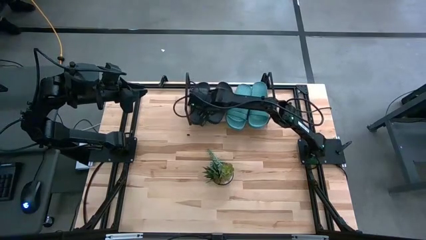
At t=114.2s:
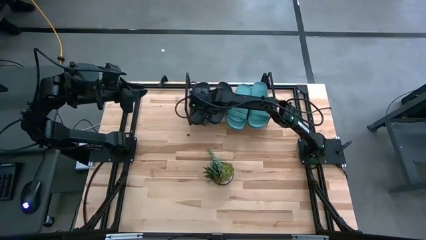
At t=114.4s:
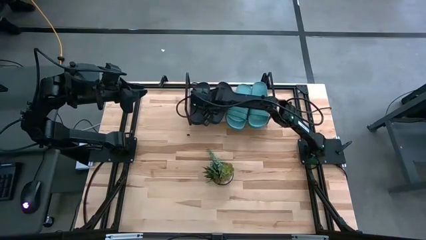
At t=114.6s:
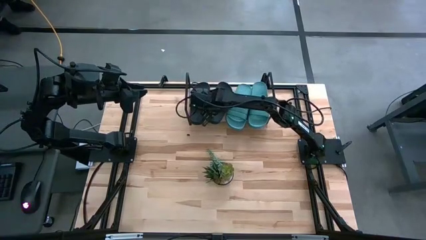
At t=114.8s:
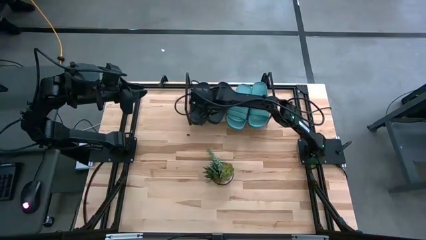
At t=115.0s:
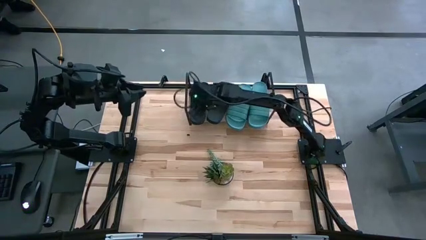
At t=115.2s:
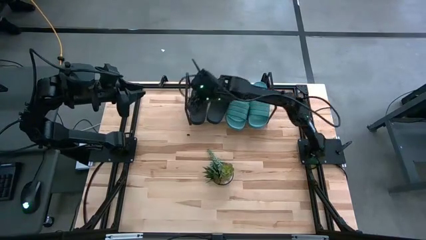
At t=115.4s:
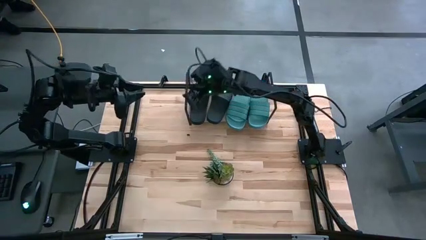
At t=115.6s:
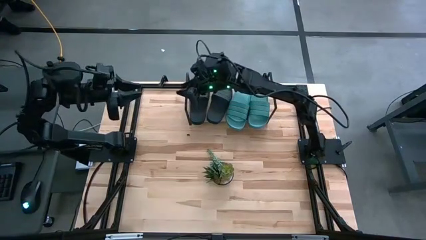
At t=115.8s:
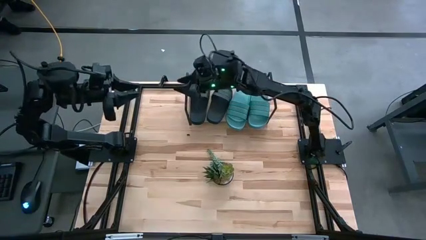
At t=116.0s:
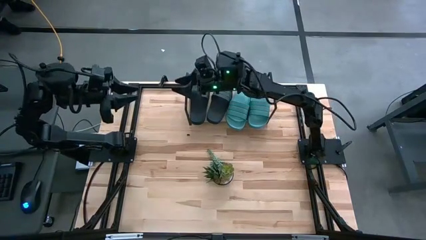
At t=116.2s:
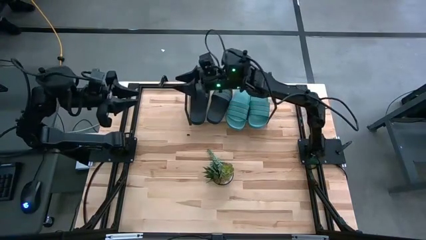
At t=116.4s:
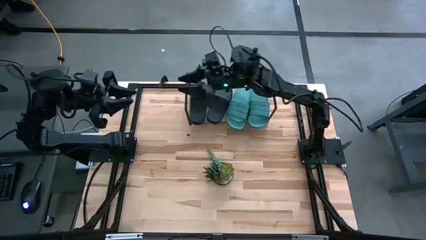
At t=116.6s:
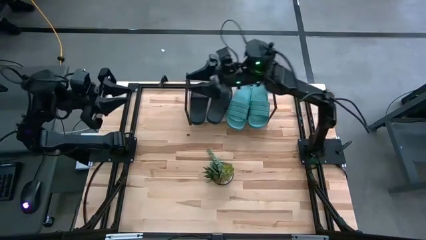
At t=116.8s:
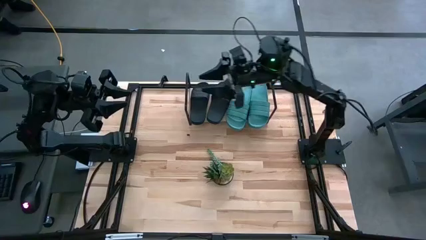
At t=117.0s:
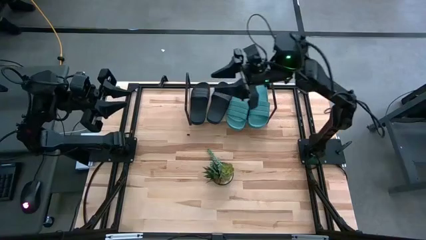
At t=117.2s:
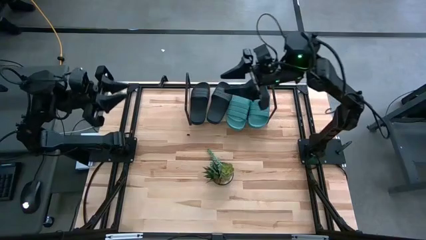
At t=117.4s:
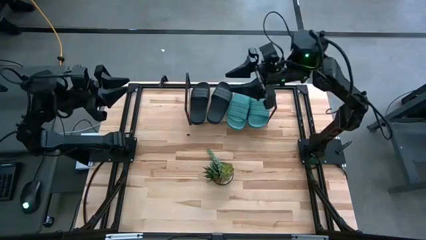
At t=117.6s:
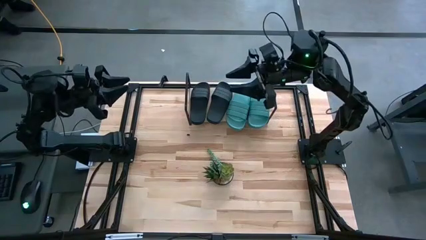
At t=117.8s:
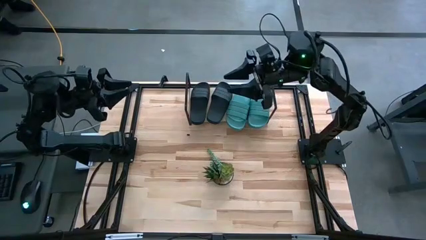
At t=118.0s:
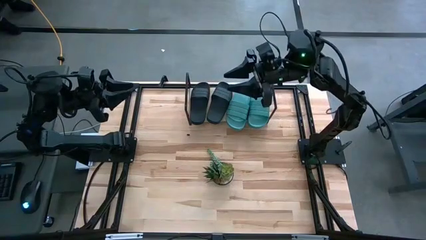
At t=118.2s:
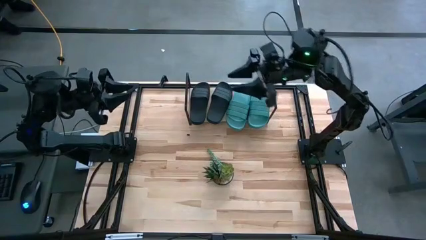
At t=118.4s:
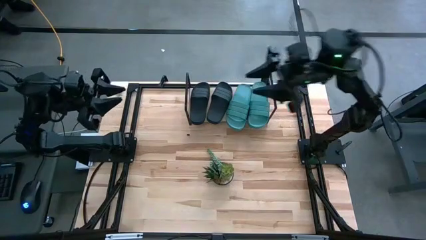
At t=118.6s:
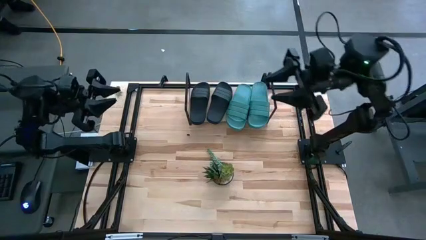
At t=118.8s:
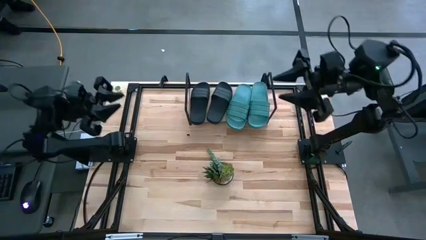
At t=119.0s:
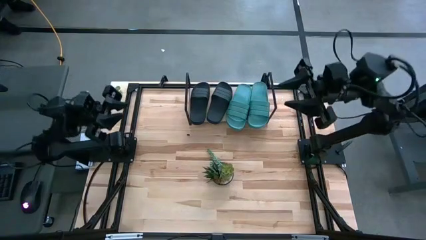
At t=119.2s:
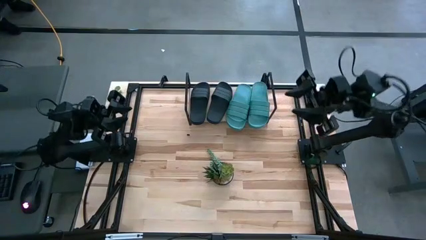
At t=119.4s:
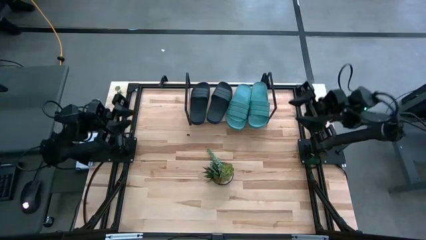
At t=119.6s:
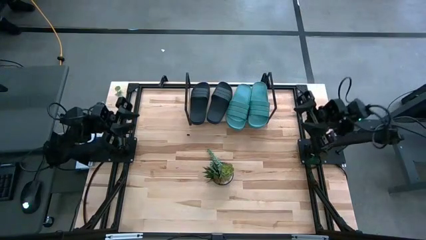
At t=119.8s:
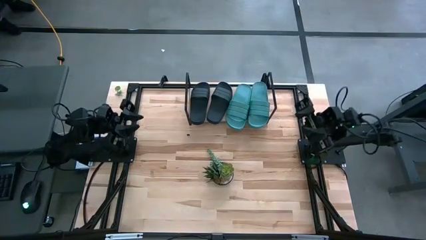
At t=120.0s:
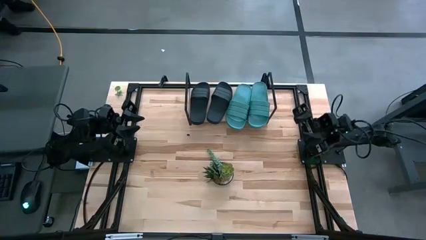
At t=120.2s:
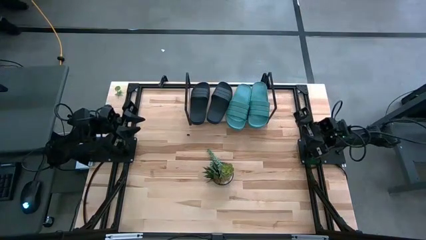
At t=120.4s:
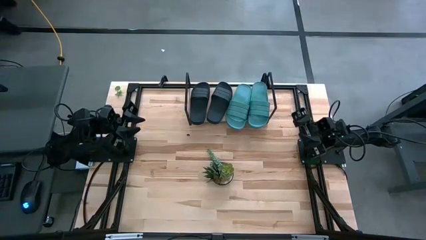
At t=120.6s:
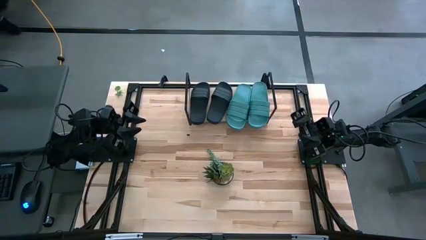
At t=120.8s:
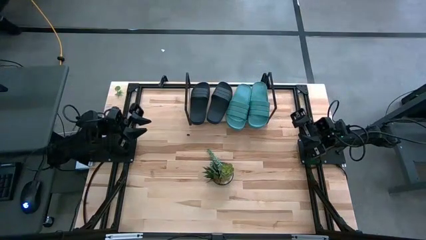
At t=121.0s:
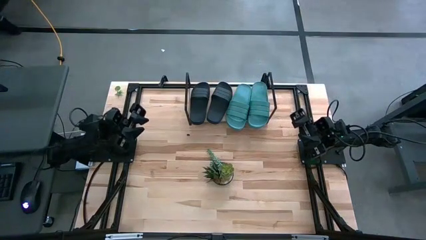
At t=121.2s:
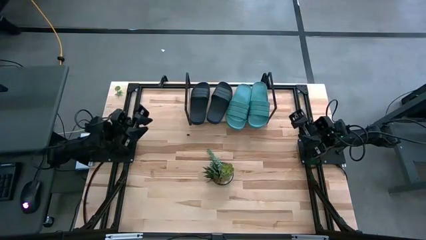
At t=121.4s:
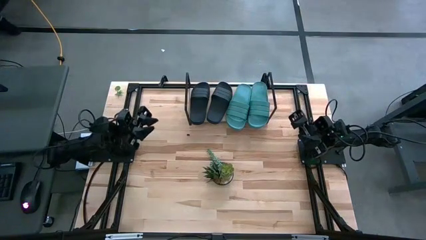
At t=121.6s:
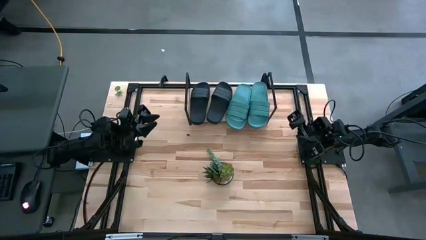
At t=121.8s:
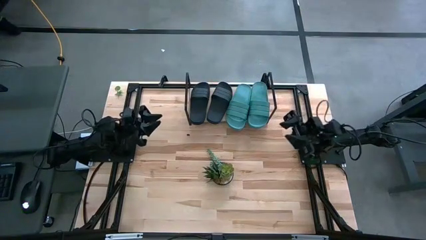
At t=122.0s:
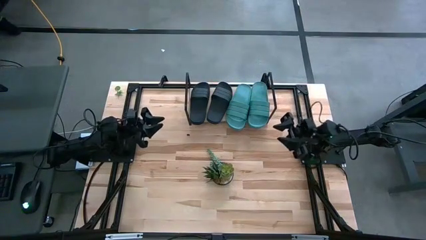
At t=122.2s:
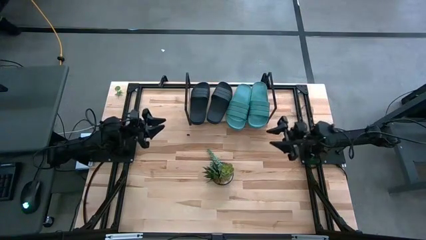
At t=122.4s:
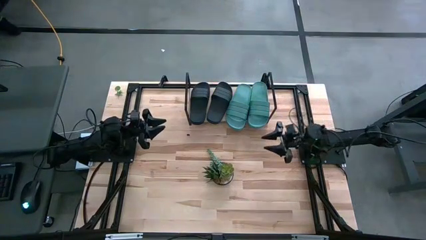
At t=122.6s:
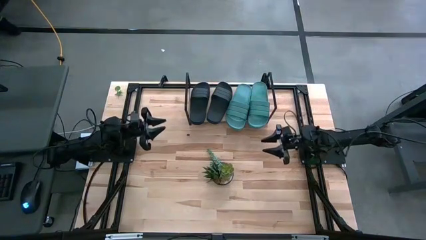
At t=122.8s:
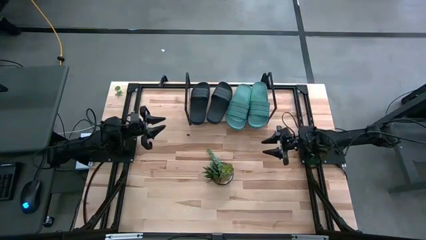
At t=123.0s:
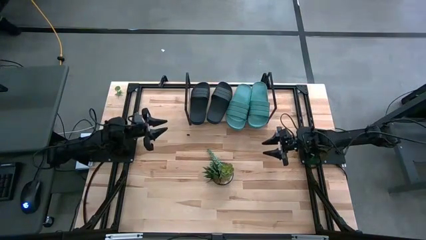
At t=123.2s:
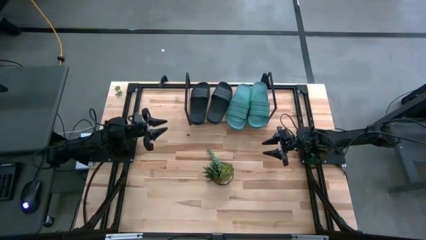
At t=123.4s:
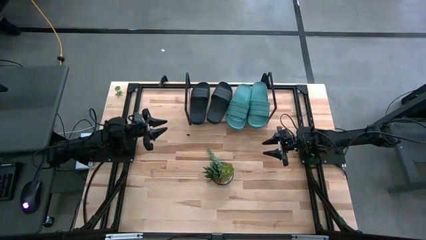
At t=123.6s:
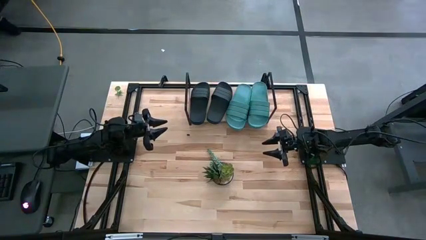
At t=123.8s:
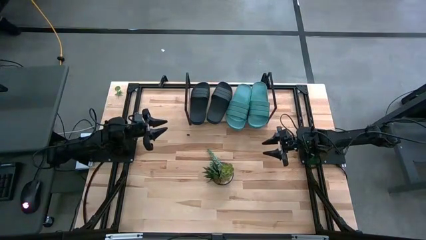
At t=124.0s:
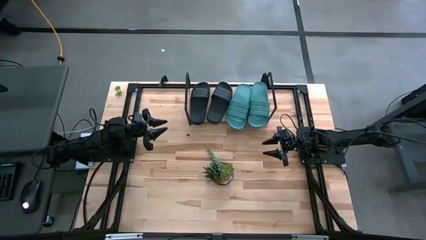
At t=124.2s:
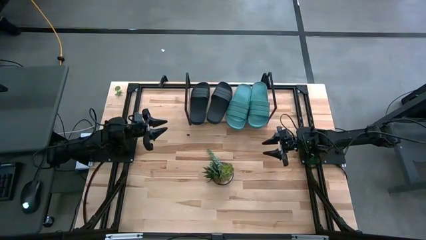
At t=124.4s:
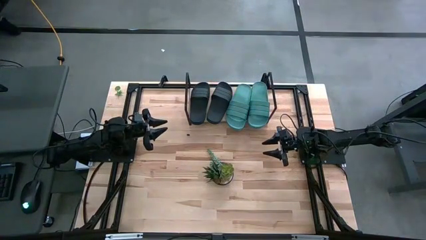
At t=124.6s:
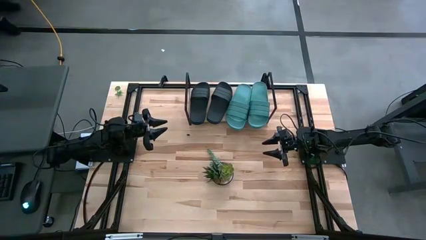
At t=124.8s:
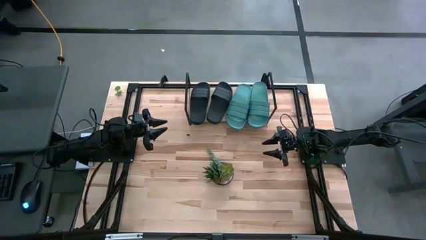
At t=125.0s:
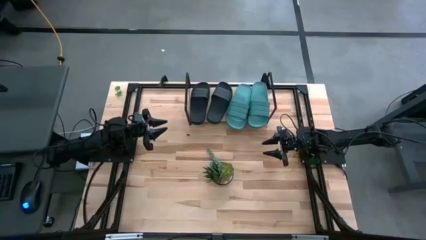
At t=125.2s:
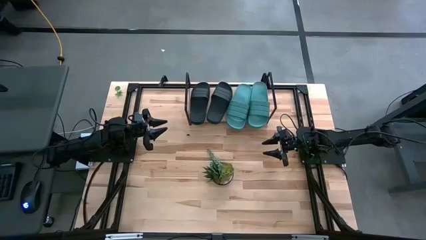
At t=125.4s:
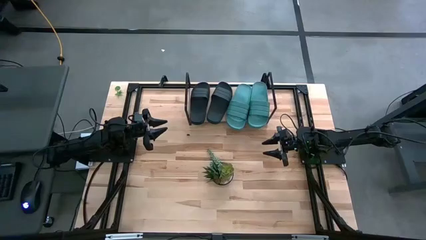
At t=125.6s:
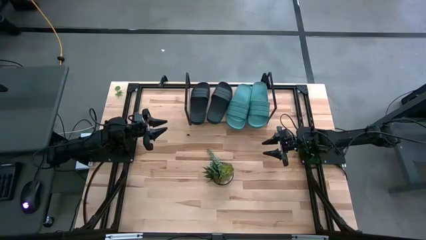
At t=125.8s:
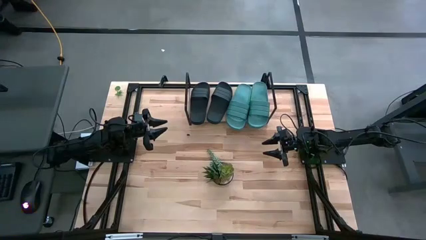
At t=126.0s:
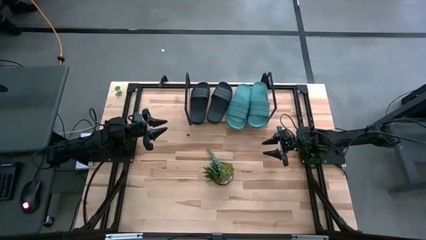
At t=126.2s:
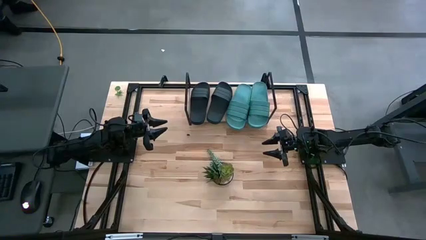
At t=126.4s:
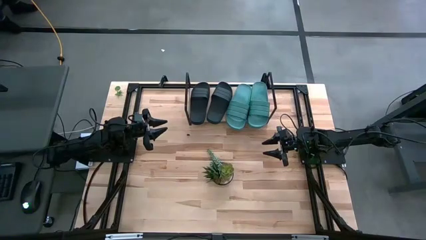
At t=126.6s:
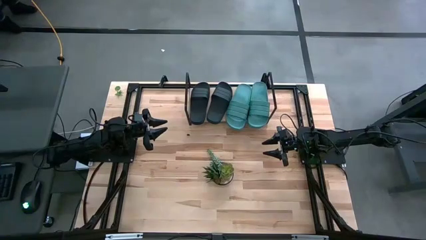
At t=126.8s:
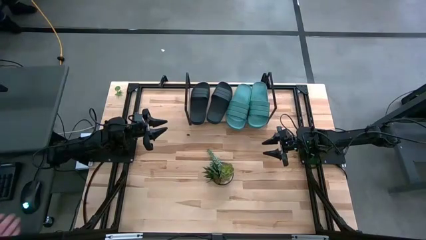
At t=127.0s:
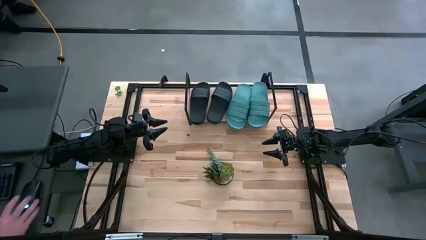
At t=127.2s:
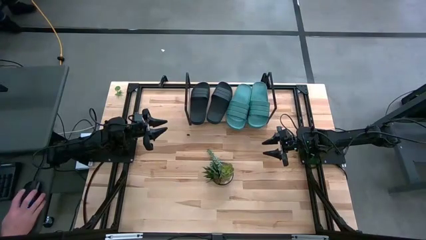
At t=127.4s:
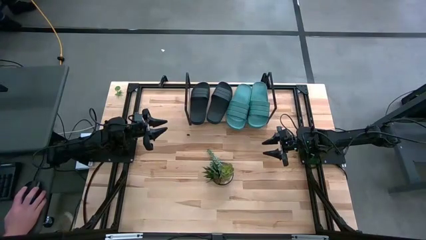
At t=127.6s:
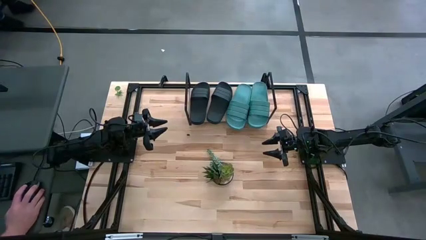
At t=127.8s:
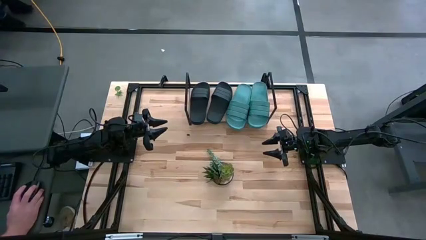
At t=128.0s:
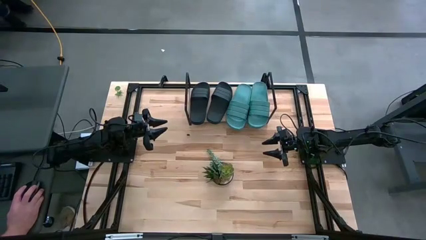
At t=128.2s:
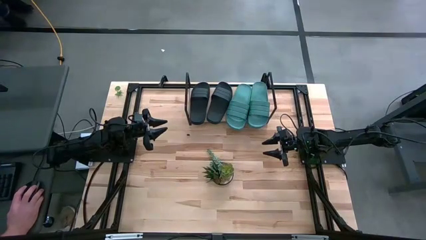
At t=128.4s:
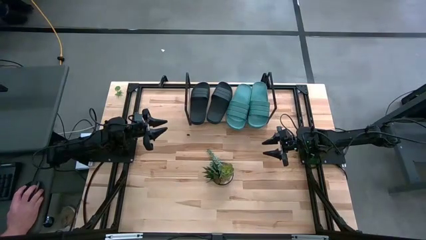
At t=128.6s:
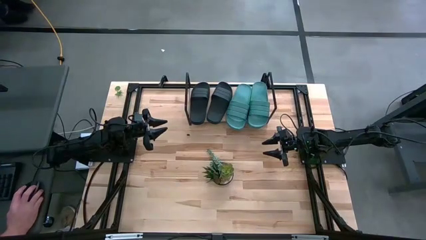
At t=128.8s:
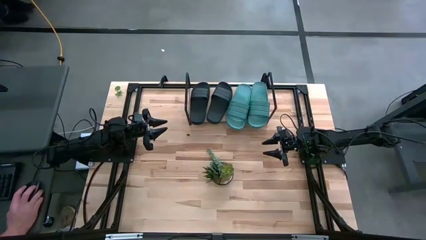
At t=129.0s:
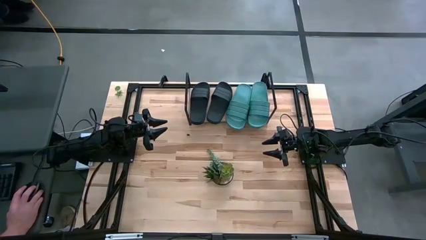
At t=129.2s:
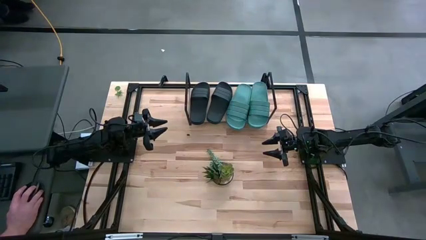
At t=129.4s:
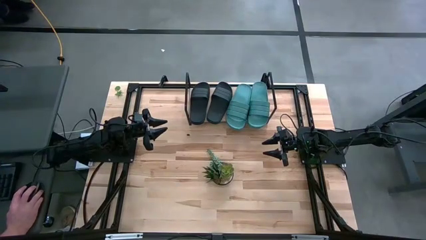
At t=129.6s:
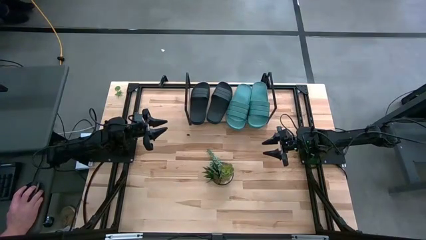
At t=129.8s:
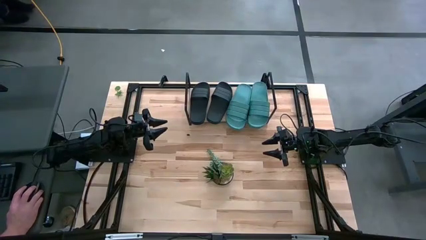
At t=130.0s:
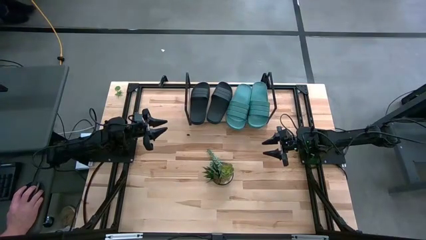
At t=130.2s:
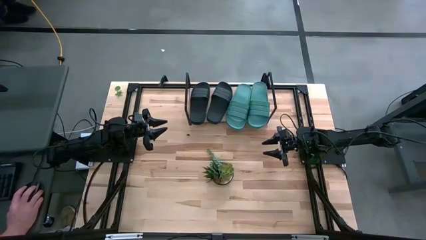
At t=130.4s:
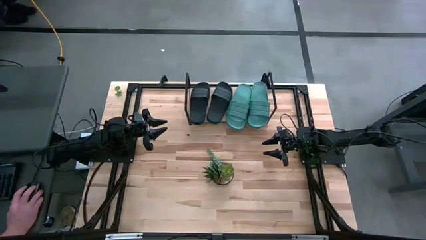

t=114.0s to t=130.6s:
Task: Pick and place slides into the shelf
Return to Home Position
